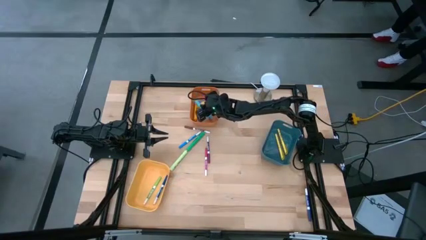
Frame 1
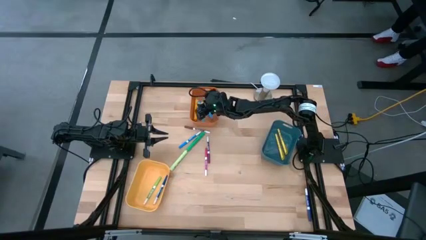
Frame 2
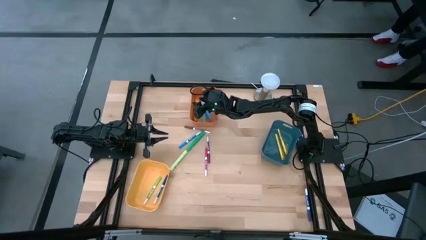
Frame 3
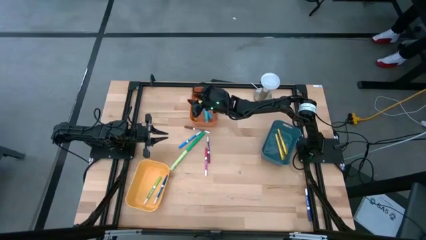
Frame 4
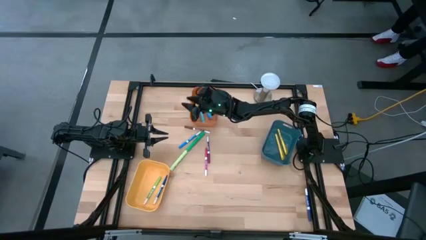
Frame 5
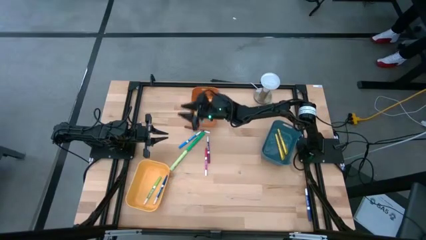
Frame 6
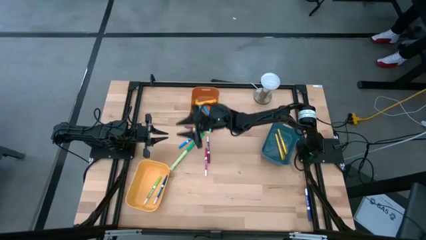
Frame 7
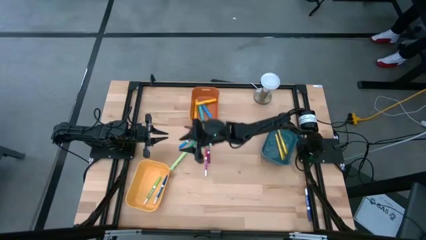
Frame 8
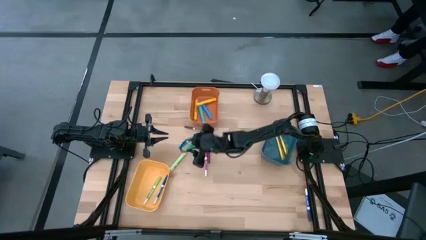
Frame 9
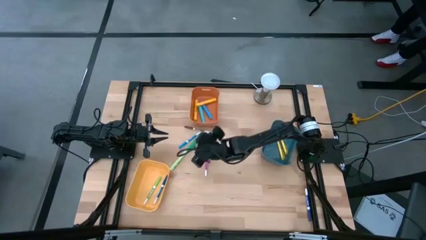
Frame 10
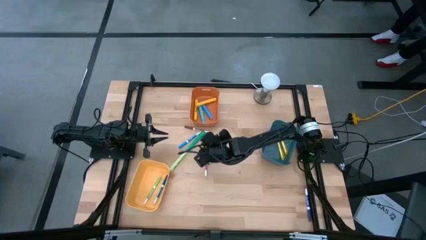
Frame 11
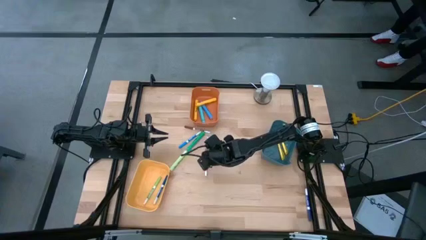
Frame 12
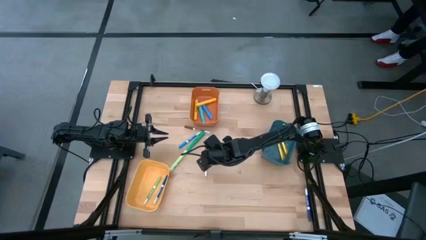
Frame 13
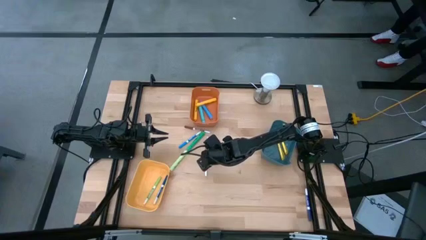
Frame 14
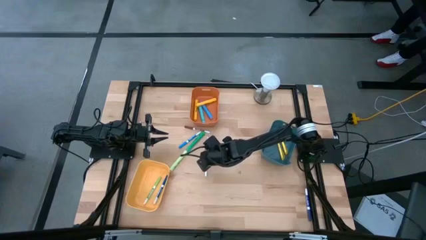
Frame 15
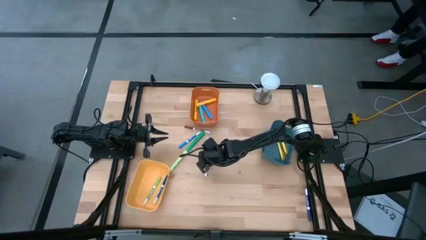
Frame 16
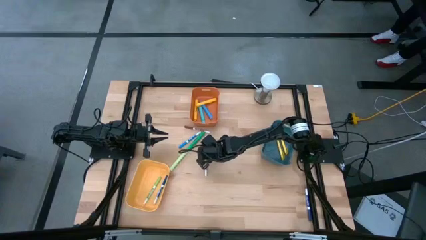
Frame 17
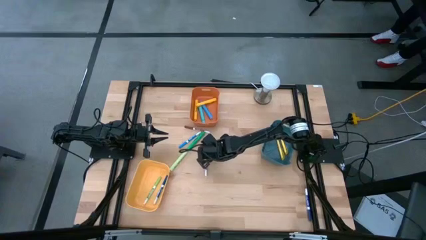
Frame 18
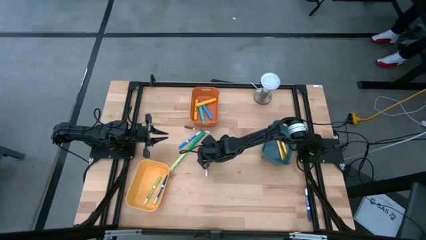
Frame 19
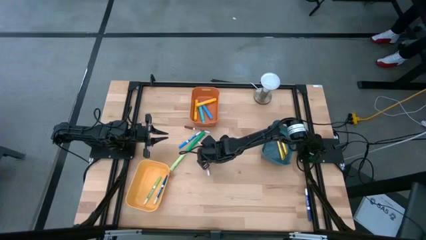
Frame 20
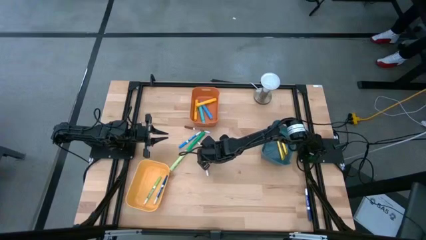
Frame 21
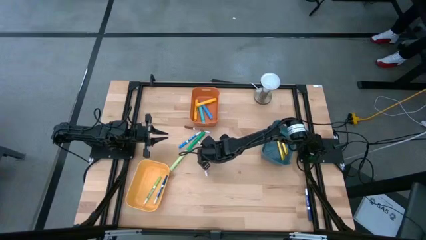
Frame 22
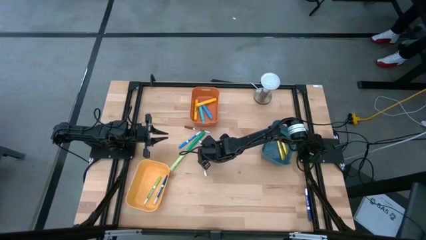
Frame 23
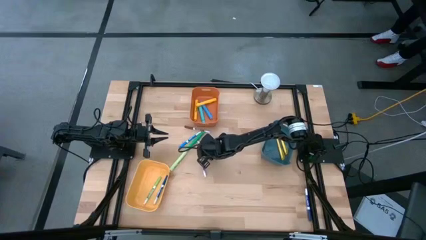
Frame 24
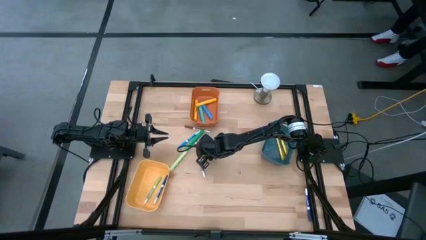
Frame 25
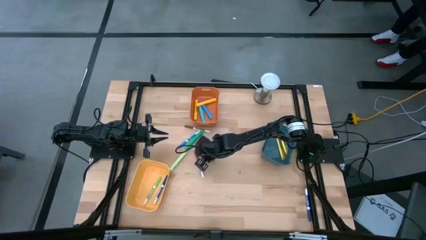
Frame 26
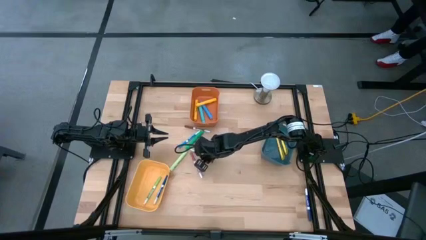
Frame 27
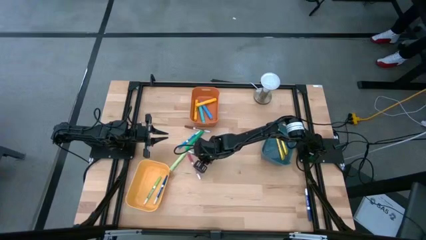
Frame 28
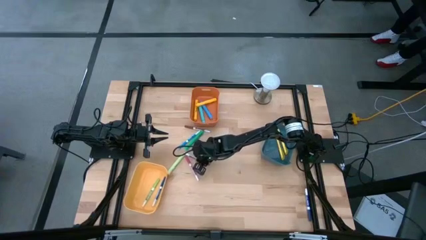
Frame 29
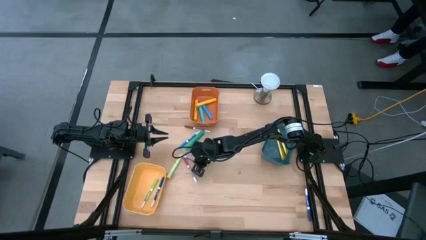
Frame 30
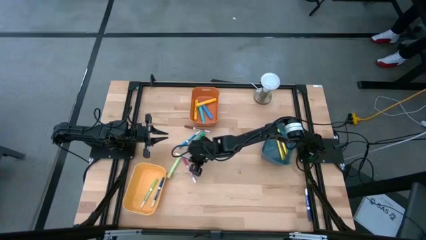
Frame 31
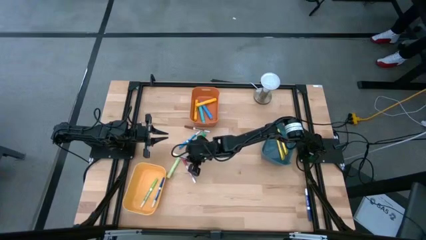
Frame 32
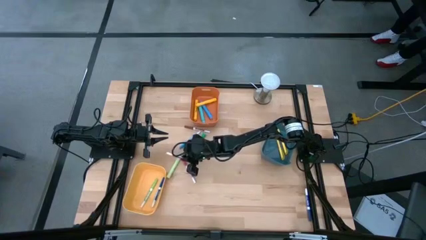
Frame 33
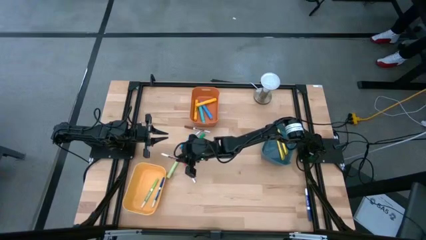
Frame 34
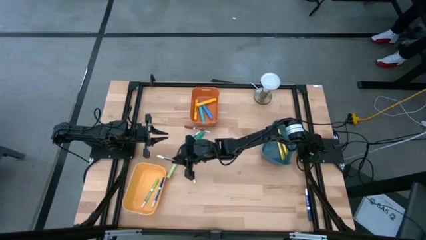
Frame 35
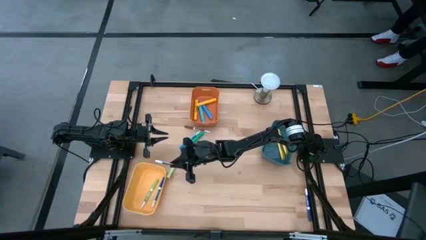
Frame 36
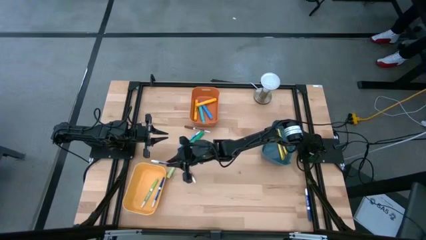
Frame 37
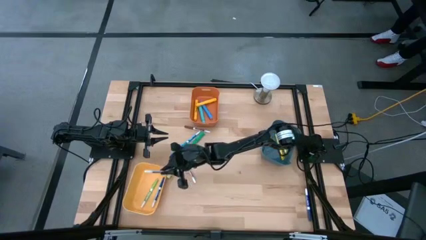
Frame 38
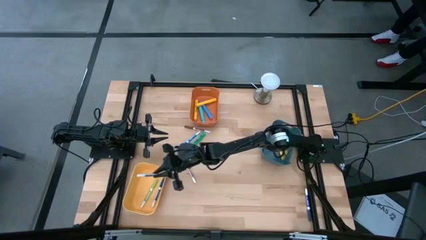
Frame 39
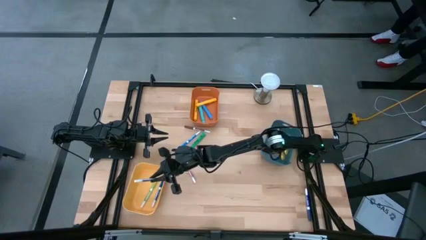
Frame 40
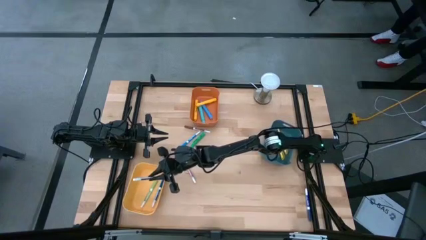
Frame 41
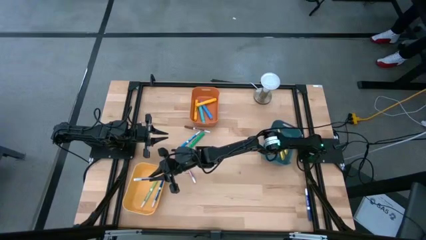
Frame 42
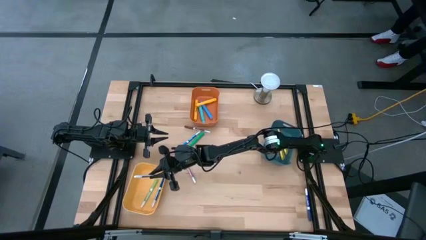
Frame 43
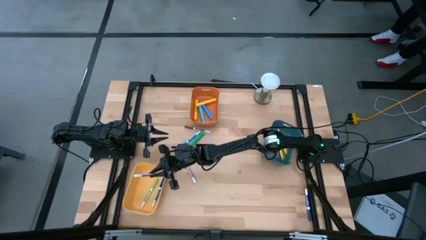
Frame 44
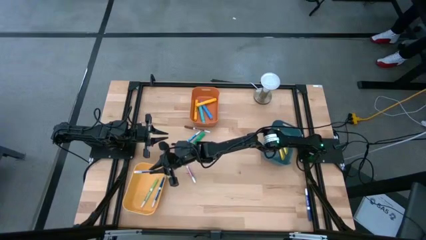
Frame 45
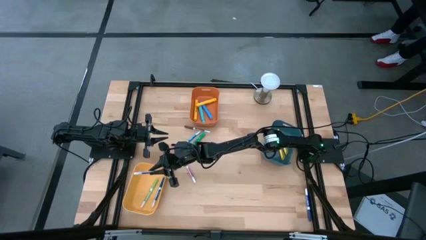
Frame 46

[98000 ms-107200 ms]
Task: Pick & Place Markers
Put the purple marker pen into the yellow bin

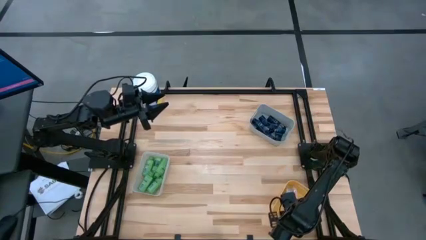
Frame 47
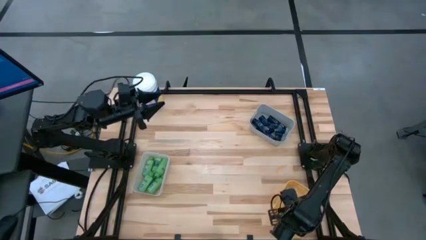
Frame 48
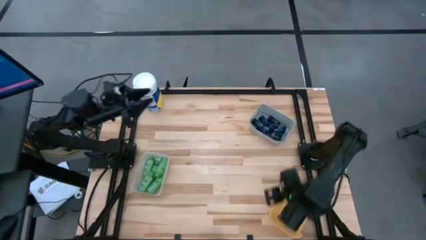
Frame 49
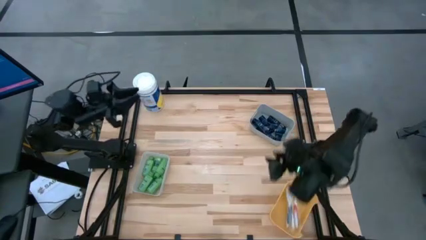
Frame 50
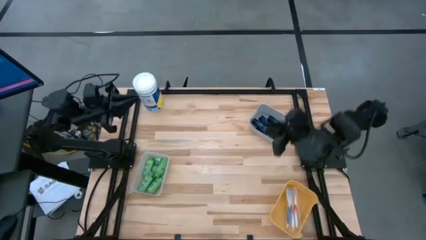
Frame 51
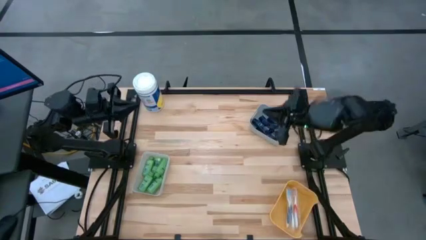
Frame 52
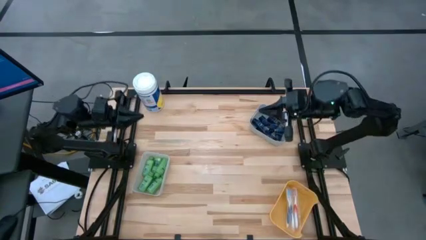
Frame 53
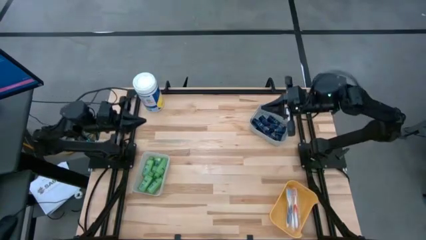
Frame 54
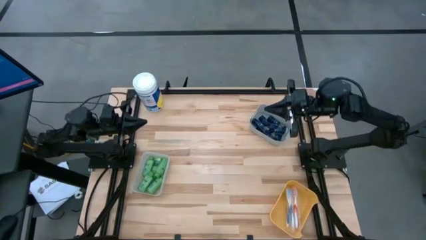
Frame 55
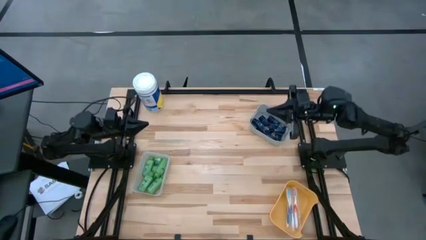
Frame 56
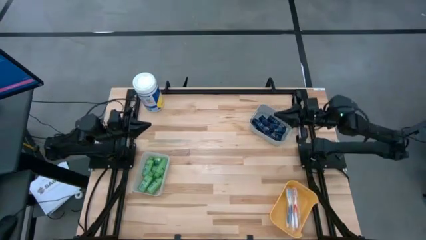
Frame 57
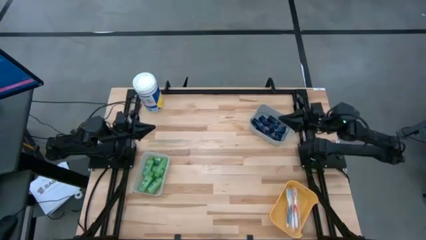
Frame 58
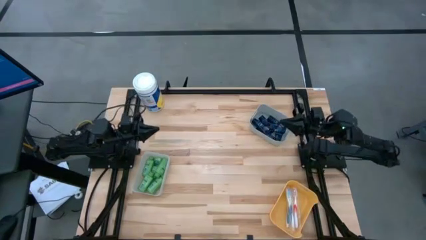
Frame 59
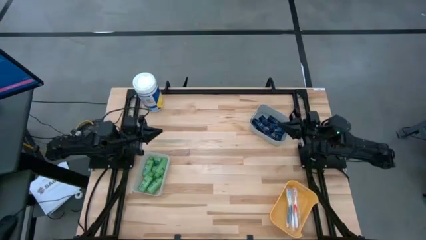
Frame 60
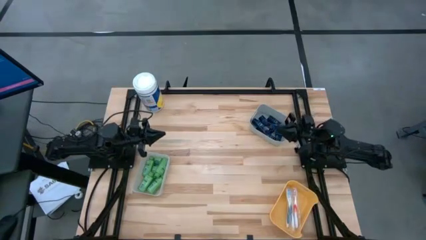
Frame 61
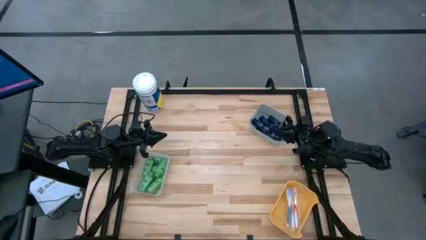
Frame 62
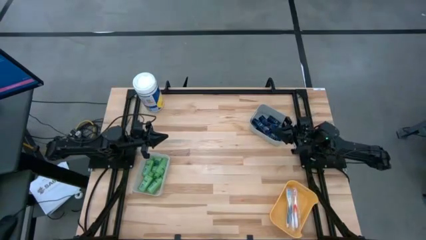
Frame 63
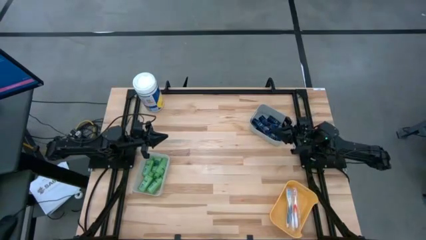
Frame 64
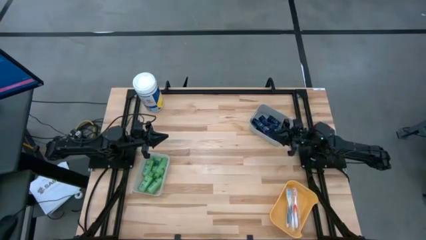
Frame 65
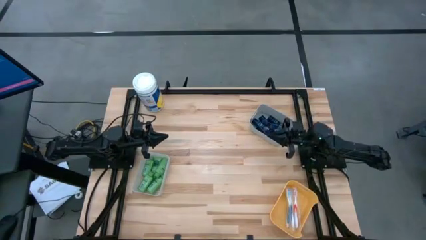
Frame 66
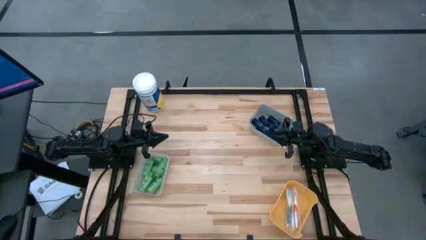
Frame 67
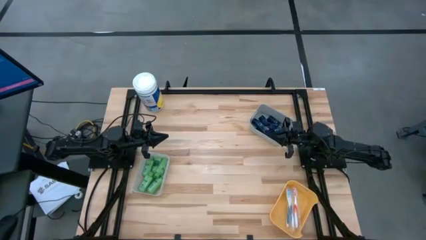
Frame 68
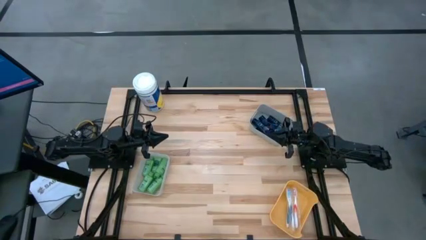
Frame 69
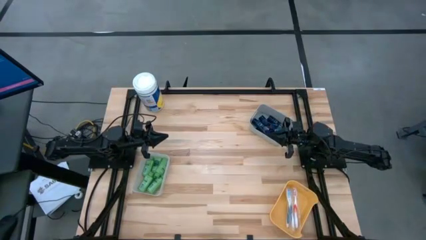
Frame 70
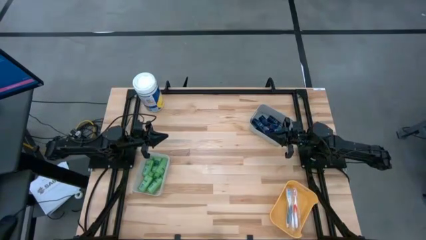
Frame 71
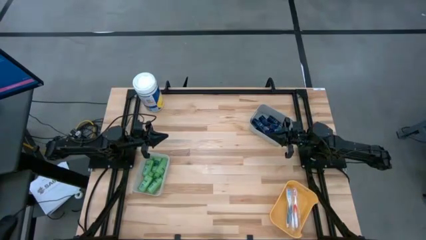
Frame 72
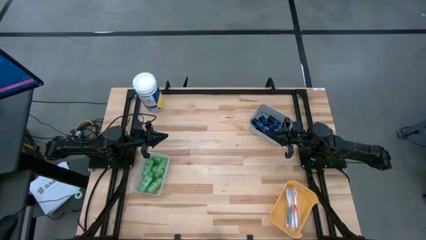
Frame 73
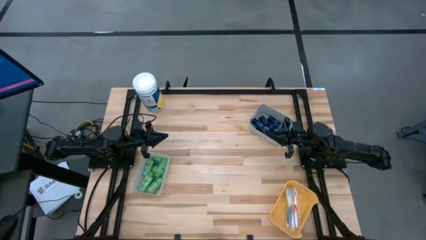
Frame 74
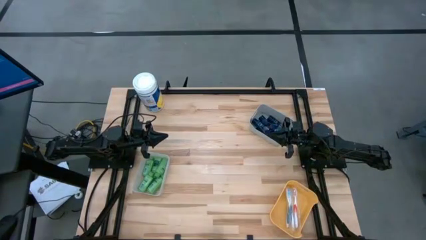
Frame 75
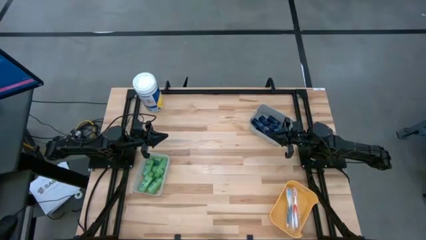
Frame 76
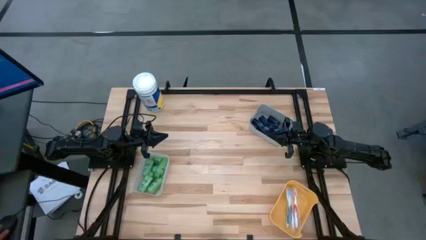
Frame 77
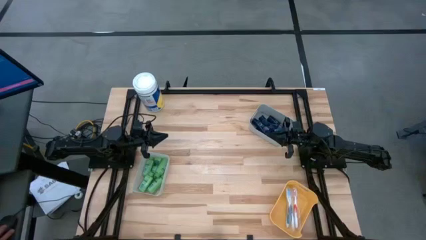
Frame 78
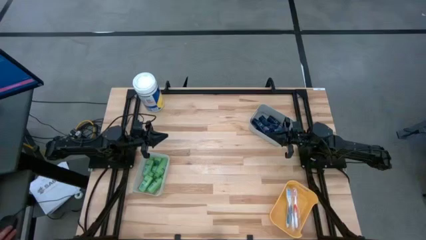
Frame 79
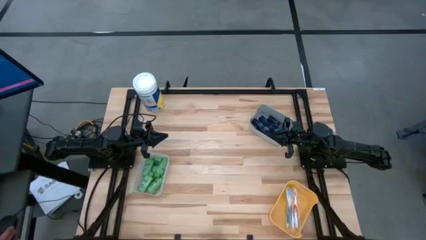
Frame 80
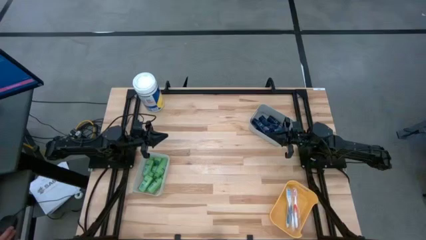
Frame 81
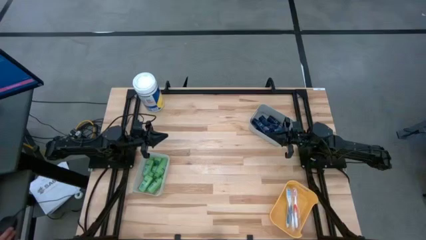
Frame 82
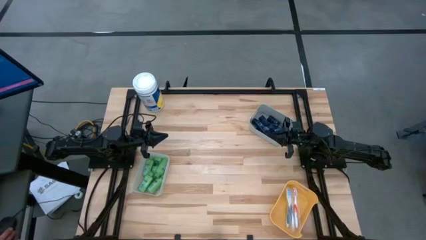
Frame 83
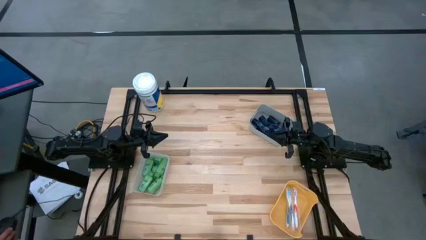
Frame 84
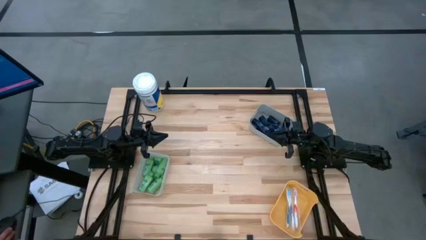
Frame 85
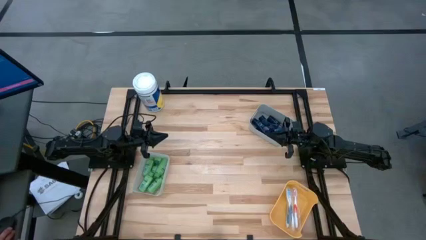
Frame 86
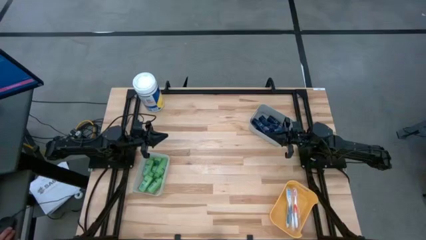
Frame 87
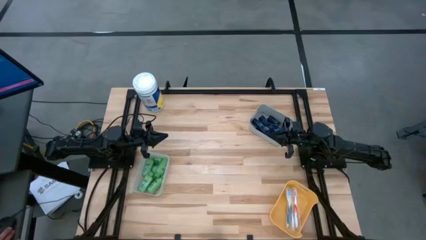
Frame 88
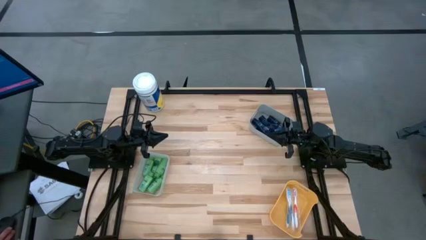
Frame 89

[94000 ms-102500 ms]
Task: Pick & Place Travel size toiletries
Return To Home Position
